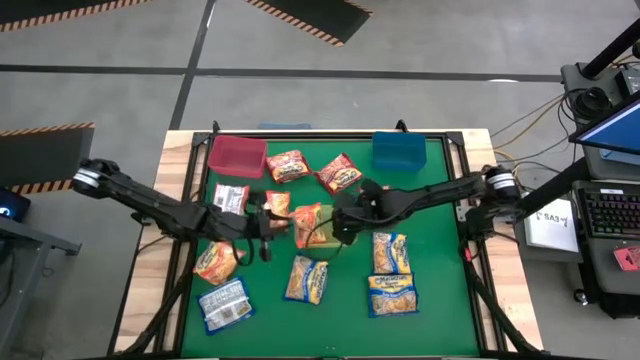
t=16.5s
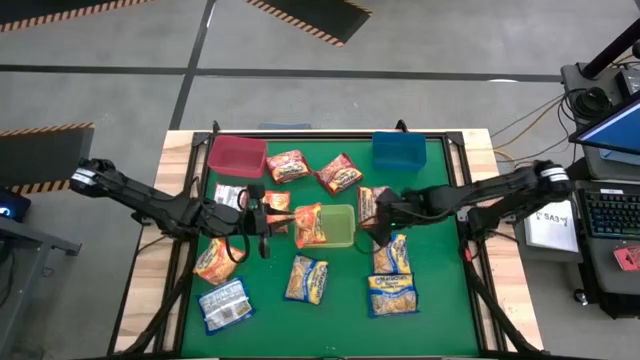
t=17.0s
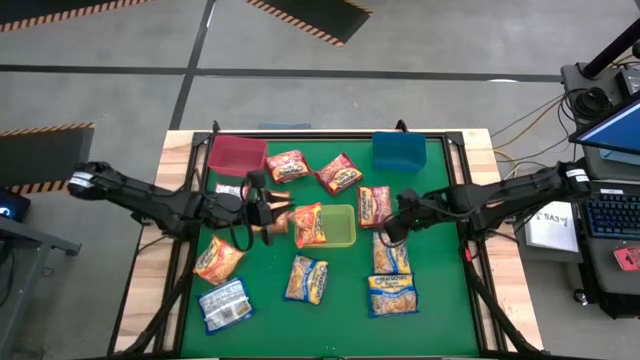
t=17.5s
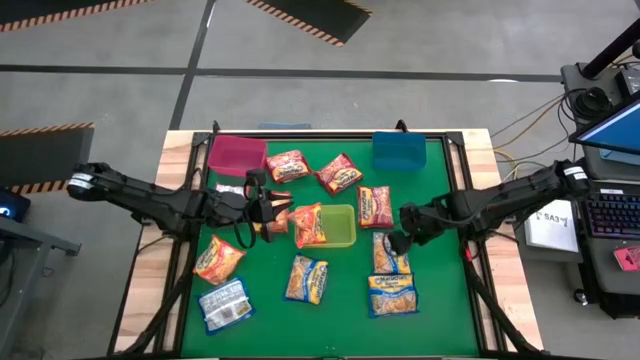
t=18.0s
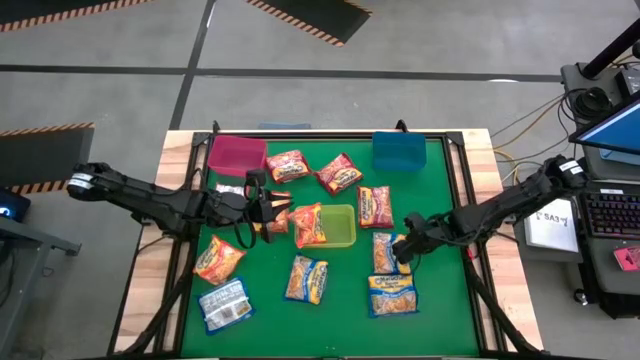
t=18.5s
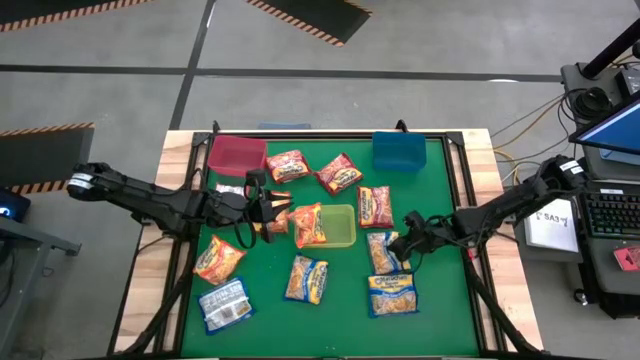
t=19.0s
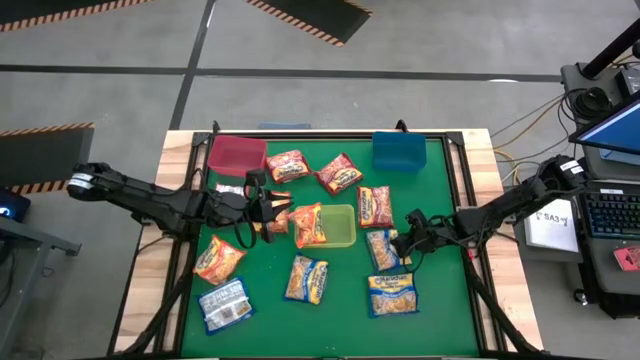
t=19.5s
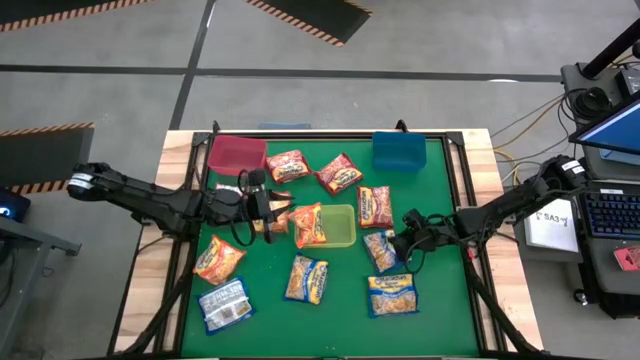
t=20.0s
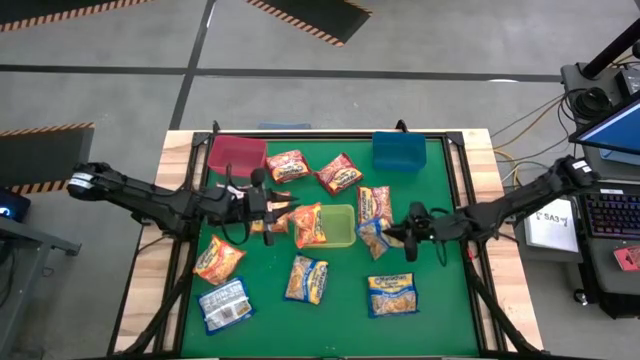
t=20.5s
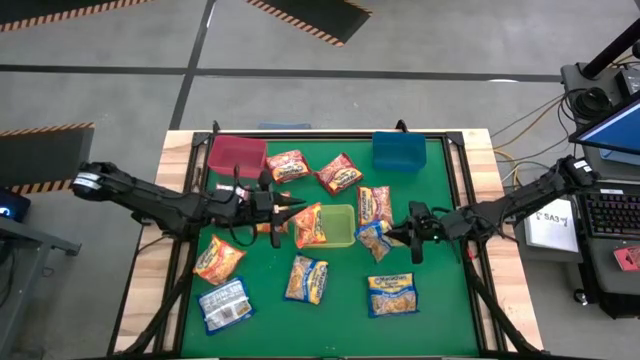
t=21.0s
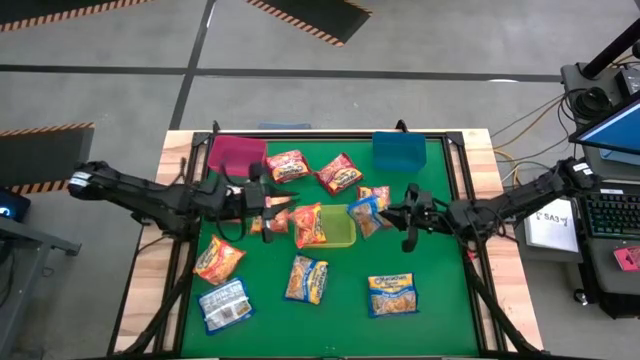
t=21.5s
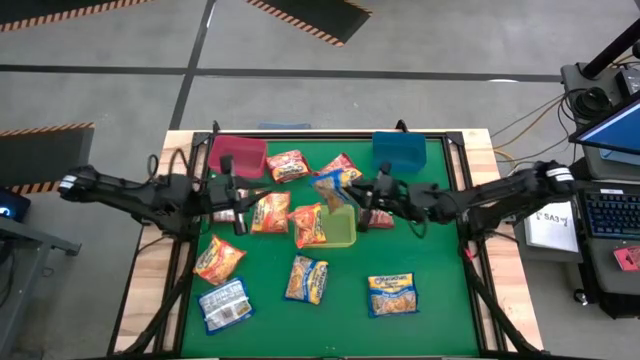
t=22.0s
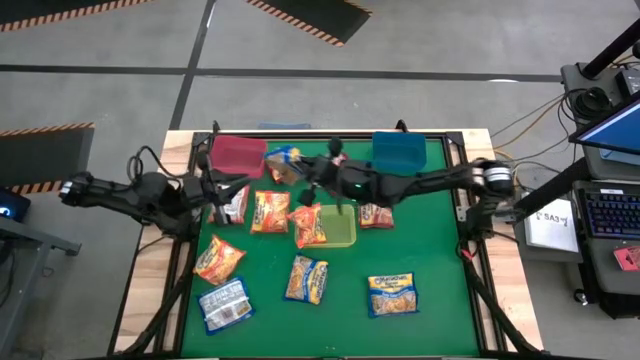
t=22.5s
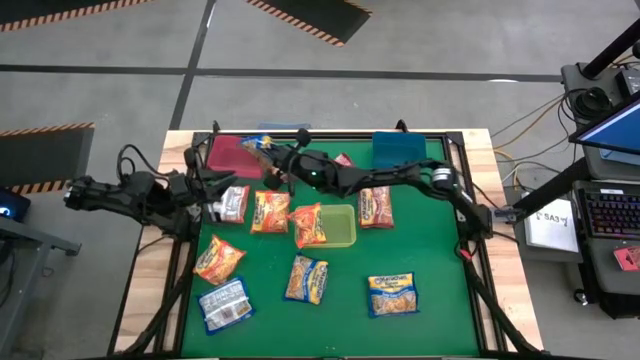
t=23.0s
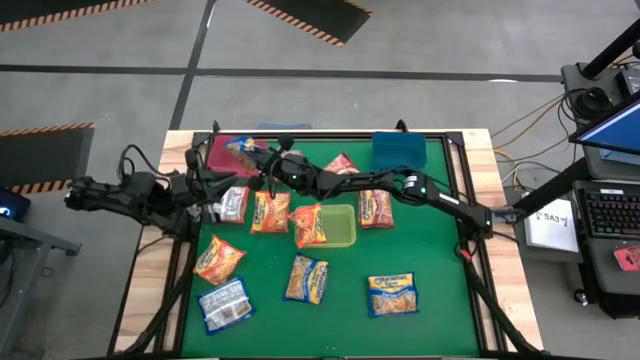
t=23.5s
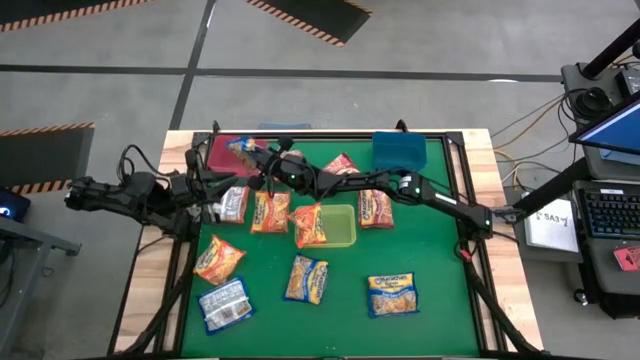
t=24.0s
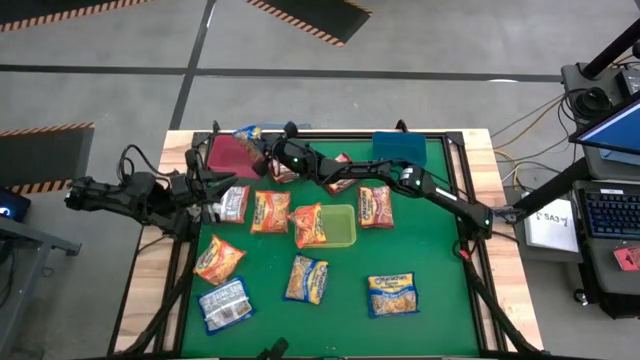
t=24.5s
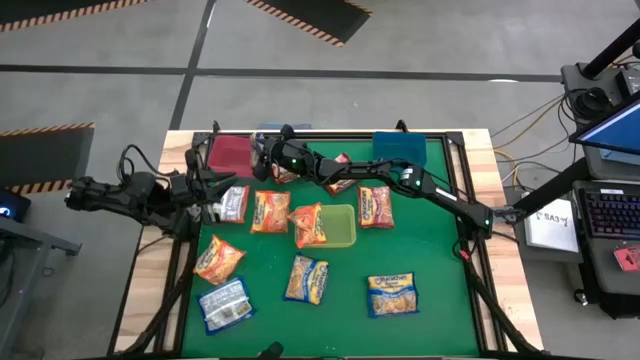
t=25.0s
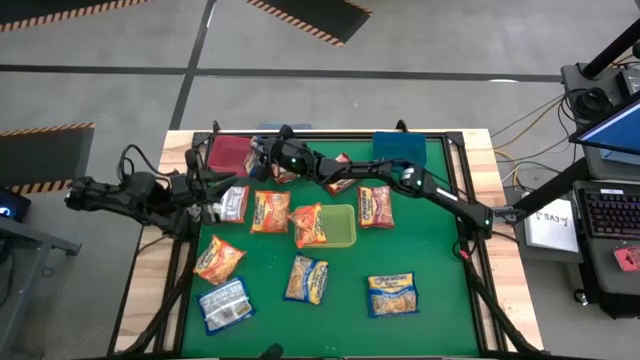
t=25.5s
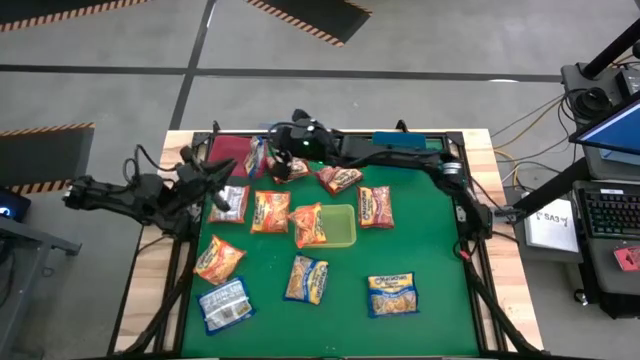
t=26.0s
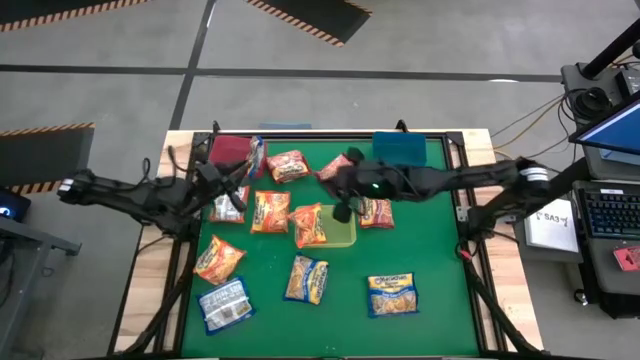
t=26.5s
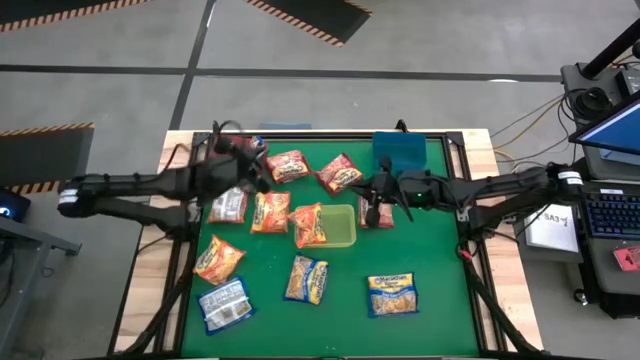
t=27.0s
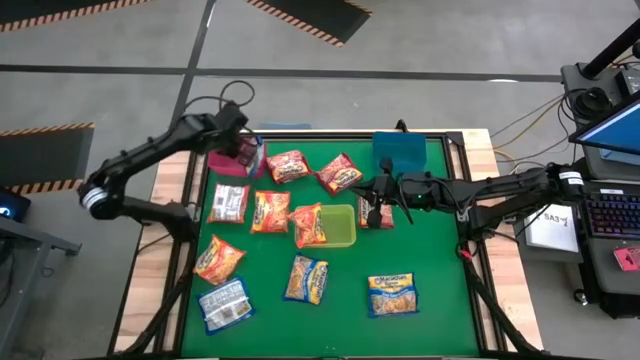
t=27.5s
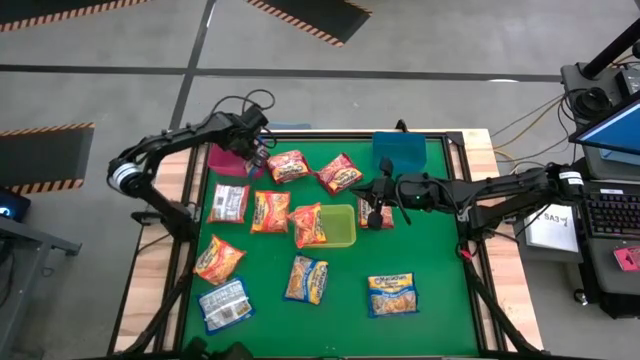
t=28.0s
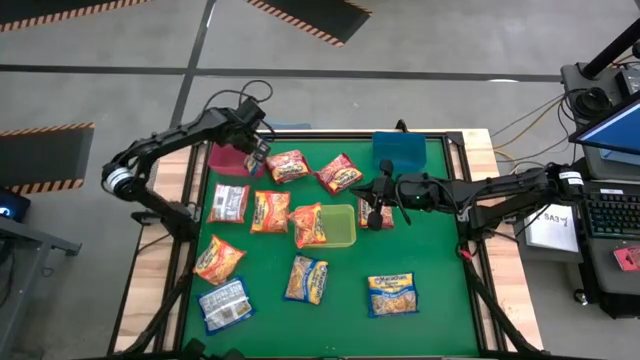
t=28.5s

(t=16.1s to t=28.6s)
Task: Sort Maruchan noodles
Put the blue noodle pack into the red bin

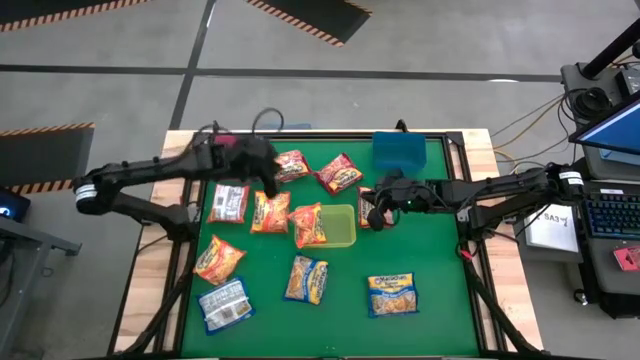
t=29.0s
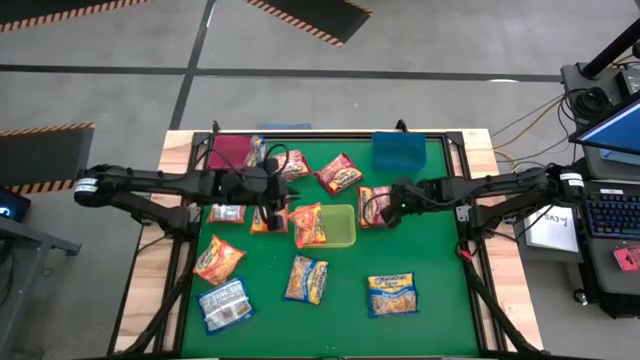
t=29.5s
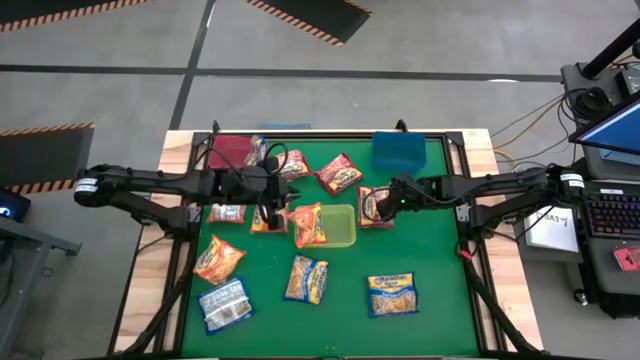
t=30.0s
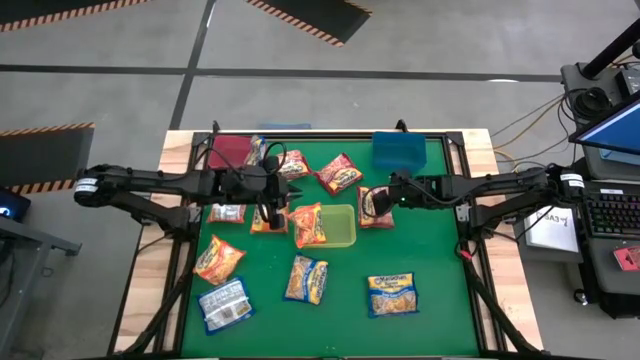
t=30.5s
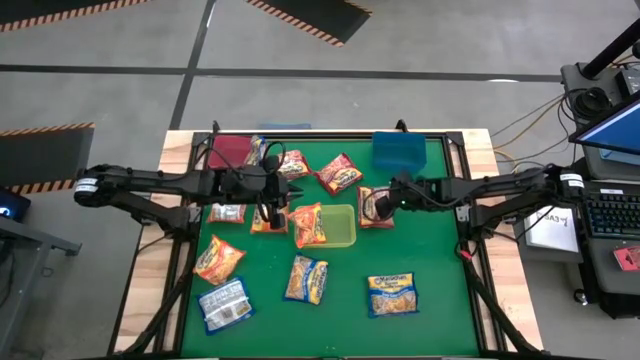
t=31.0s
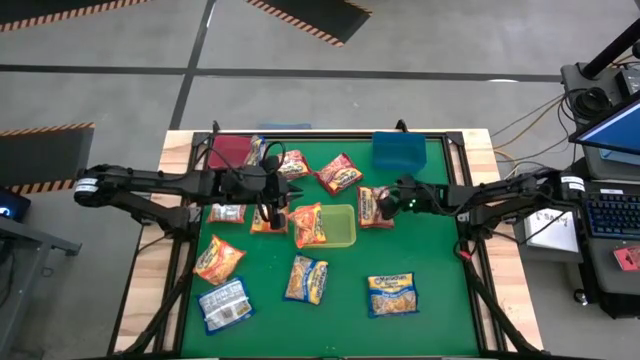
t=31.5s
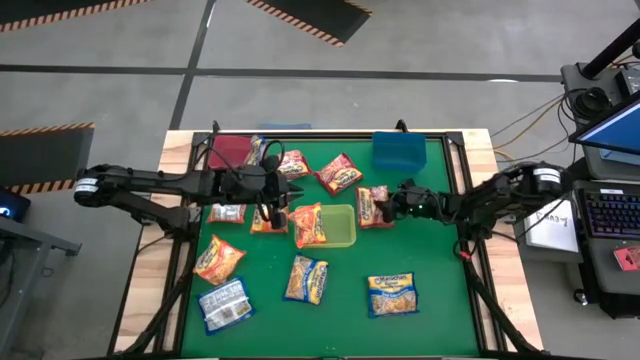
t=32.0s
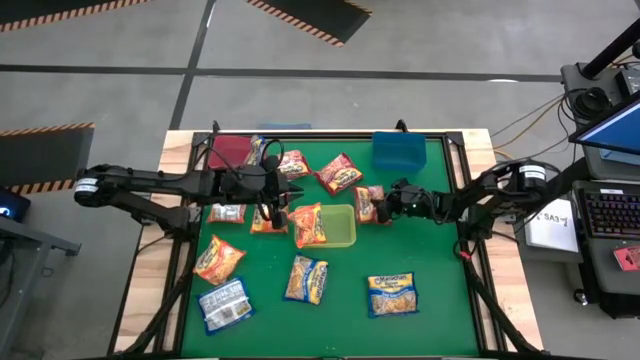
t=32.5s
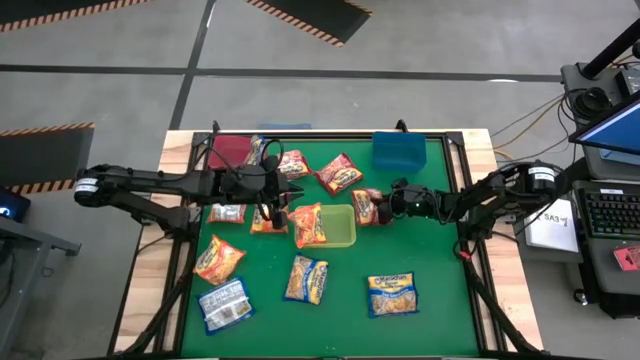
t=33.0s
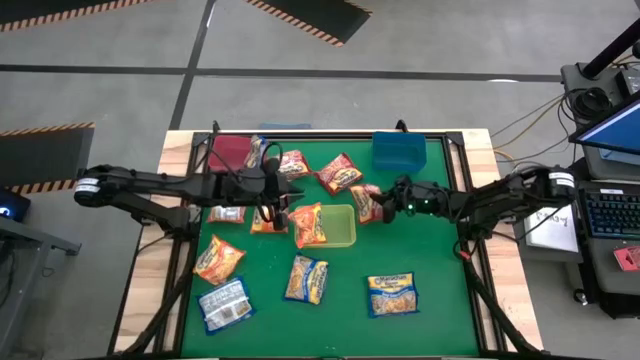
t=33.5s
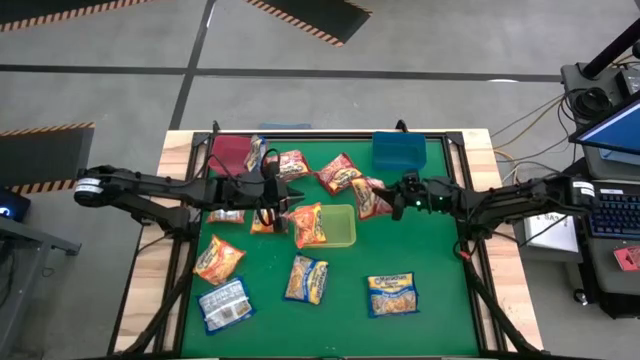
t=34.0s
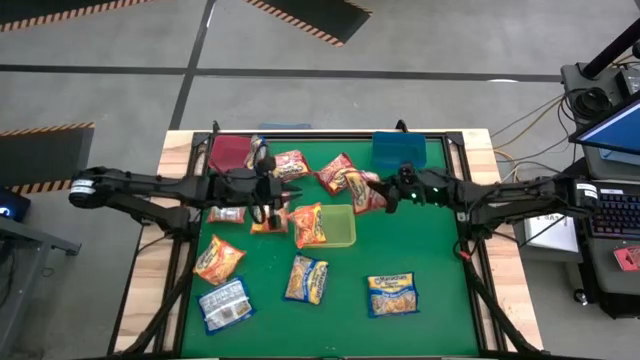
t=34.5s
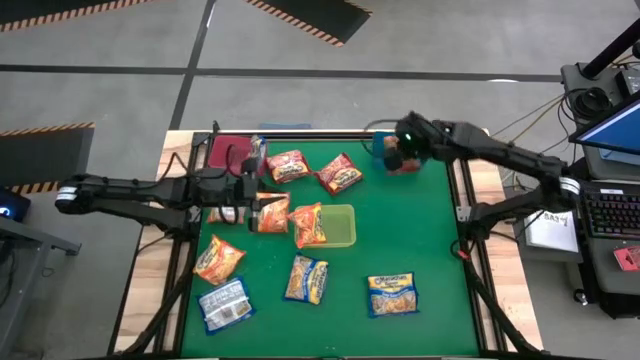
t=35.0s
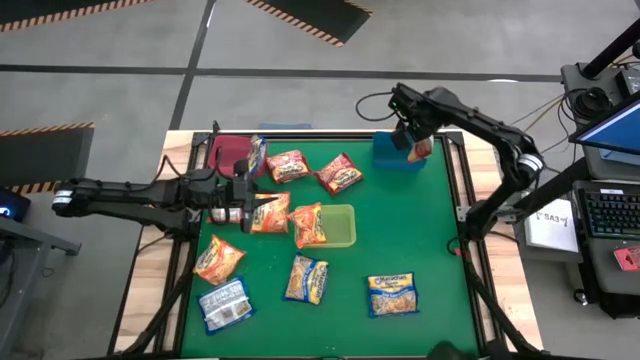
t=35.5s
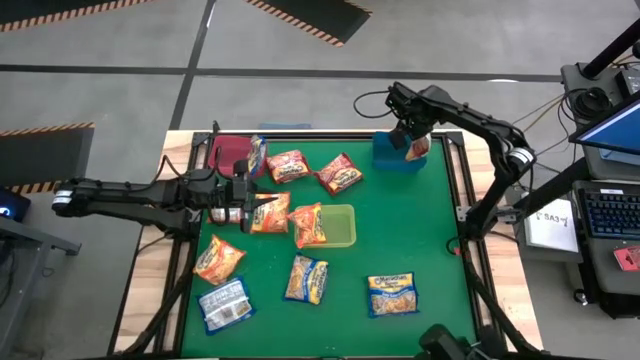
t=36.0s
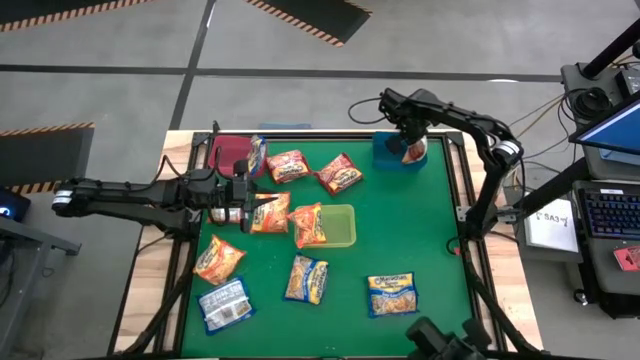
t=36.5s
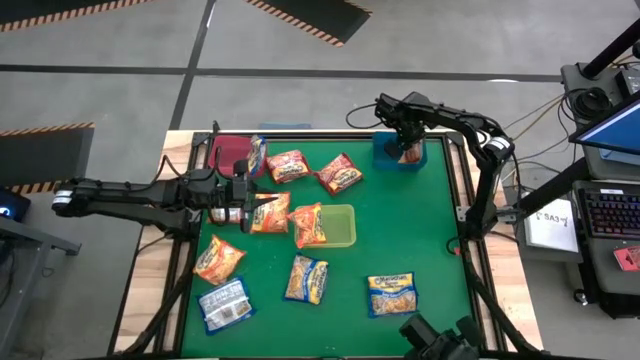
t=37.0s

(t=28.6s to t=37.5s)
Put the red noodle pack into the blue bin
